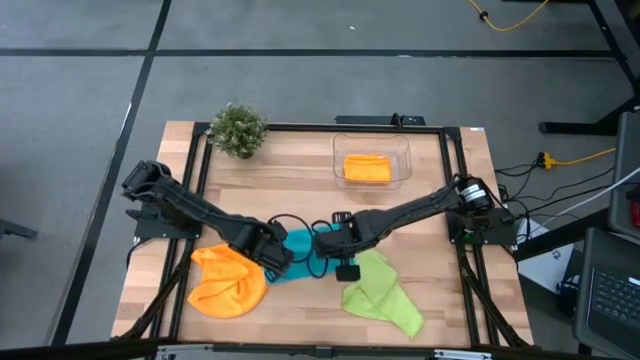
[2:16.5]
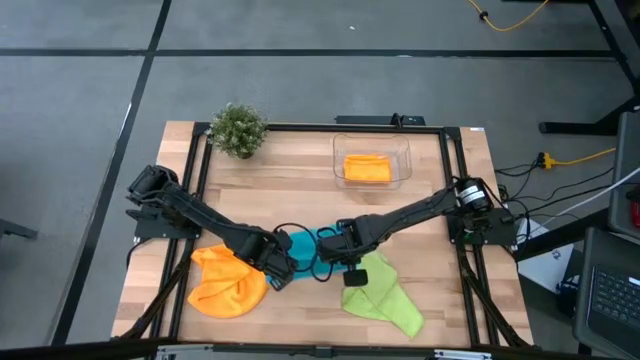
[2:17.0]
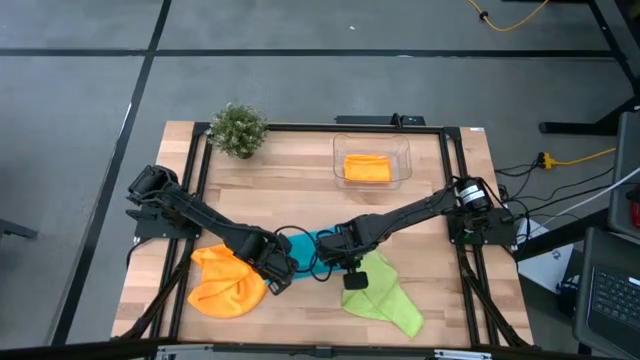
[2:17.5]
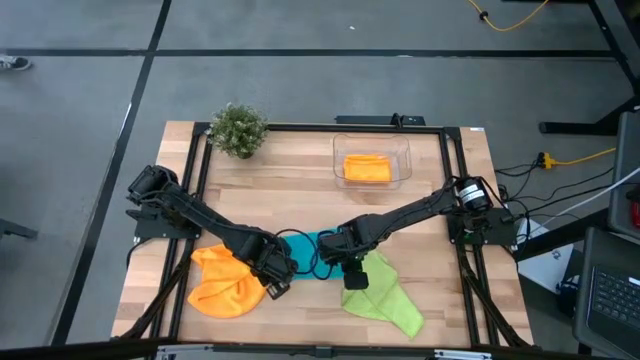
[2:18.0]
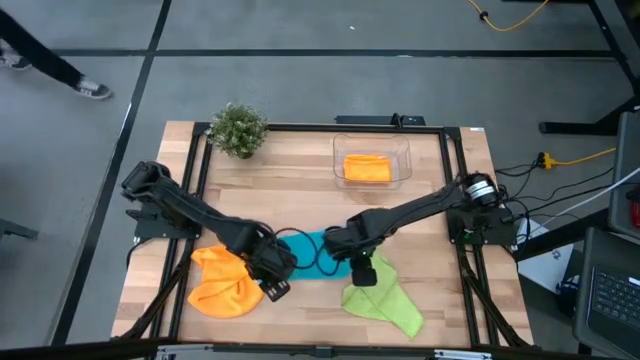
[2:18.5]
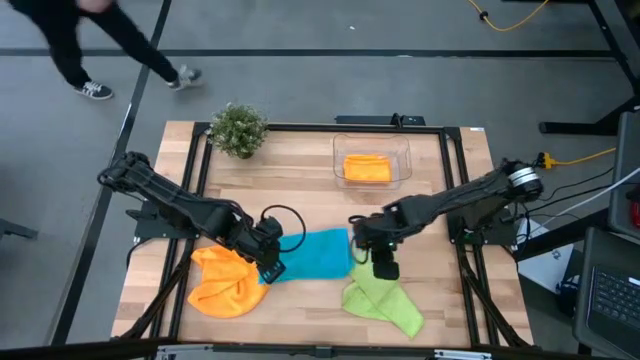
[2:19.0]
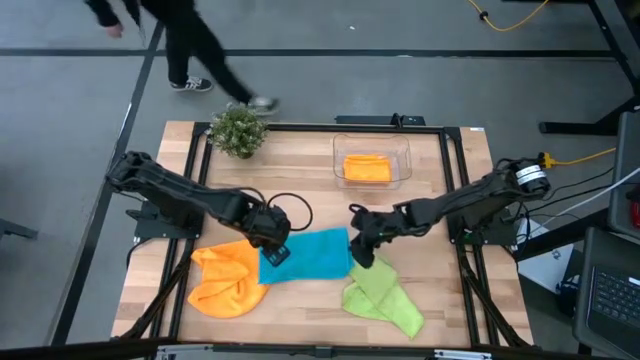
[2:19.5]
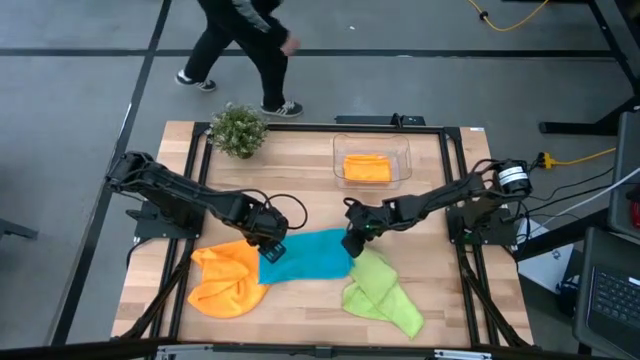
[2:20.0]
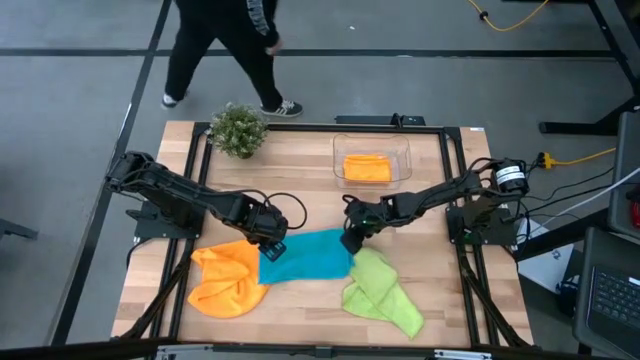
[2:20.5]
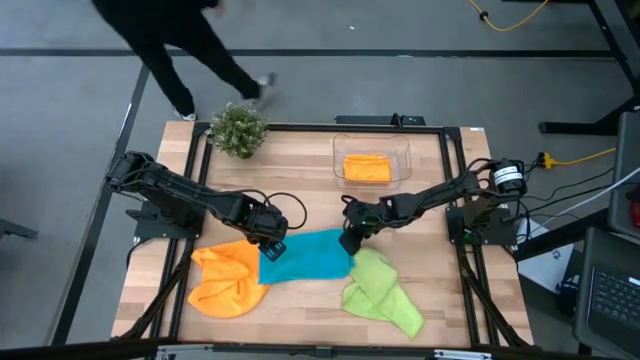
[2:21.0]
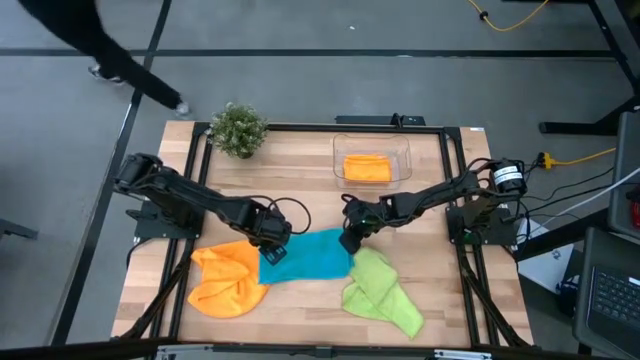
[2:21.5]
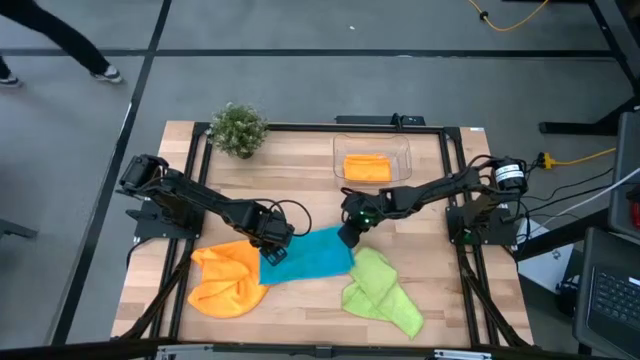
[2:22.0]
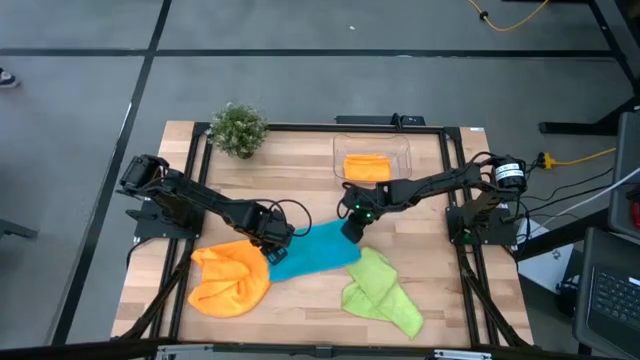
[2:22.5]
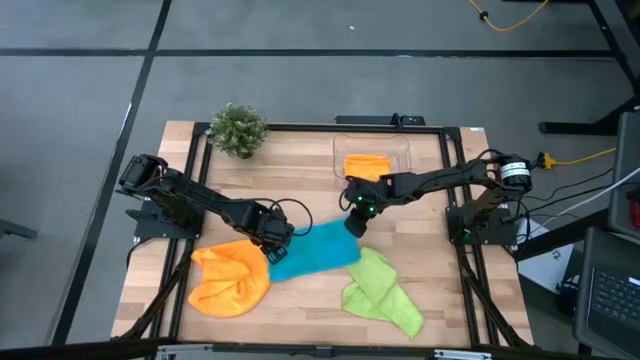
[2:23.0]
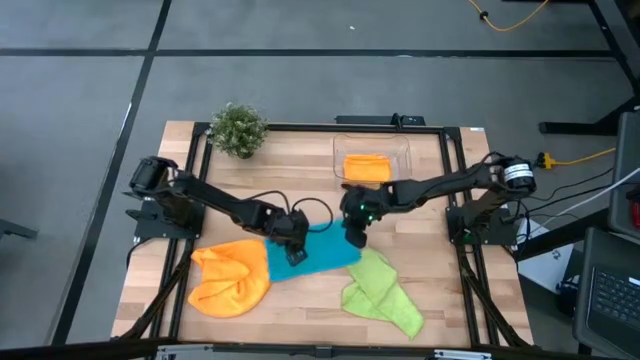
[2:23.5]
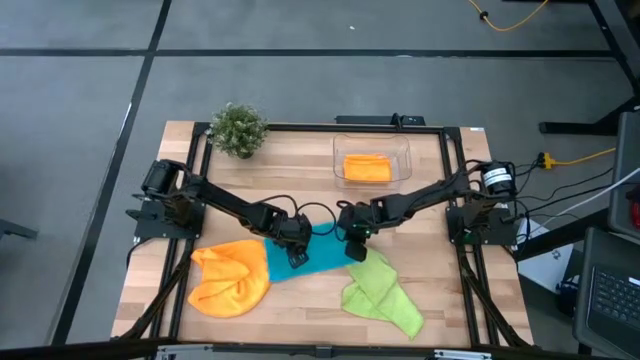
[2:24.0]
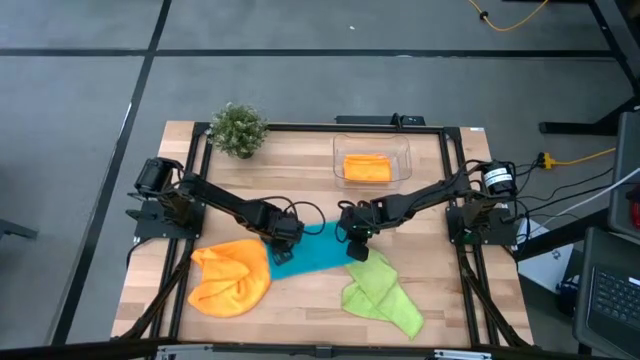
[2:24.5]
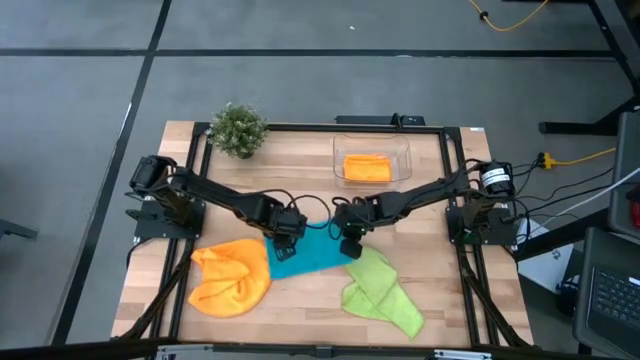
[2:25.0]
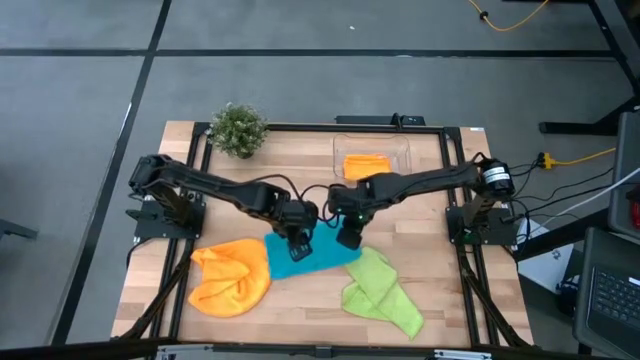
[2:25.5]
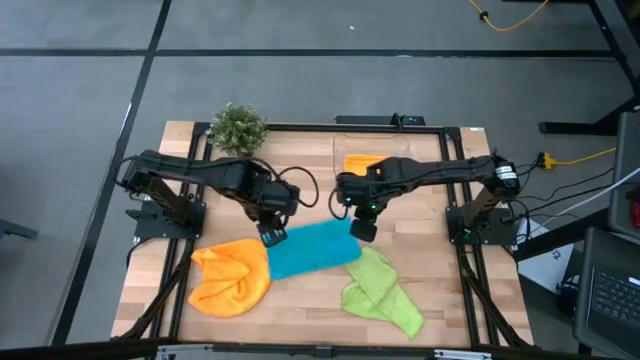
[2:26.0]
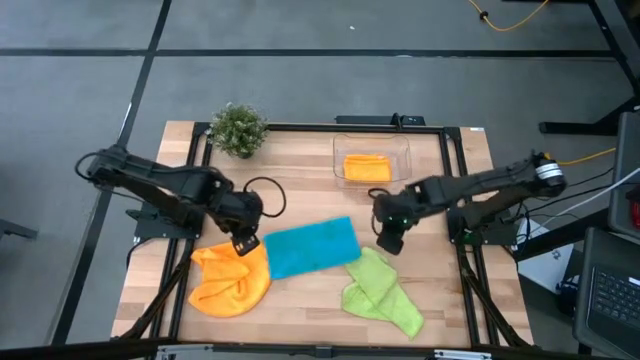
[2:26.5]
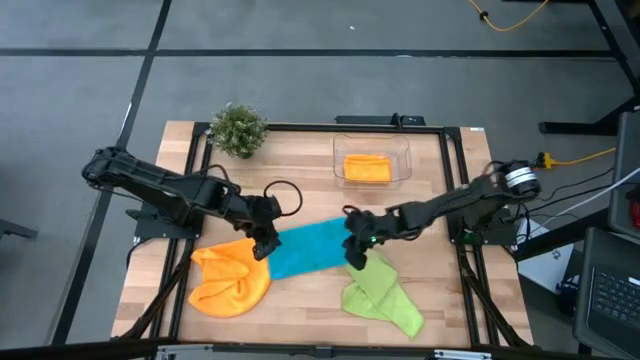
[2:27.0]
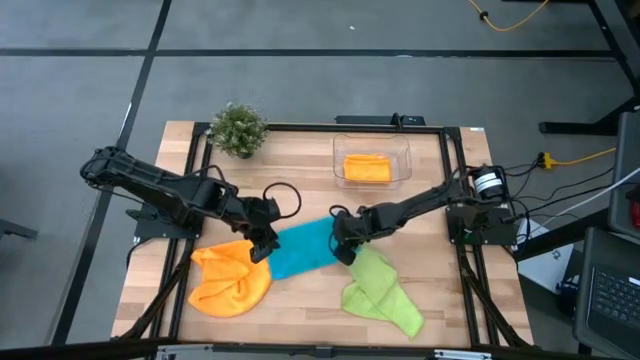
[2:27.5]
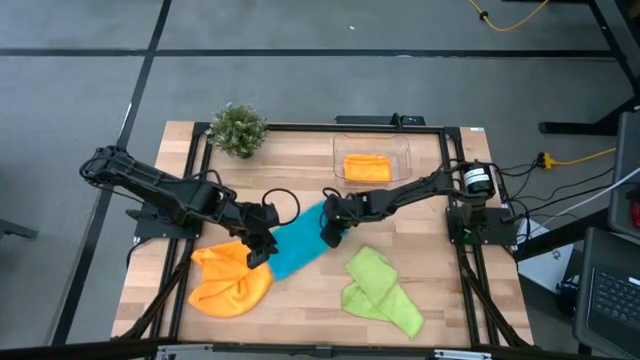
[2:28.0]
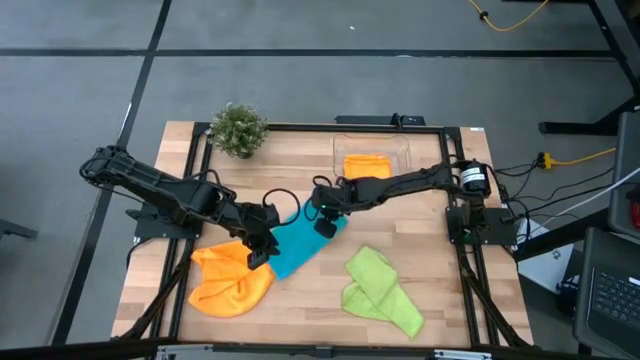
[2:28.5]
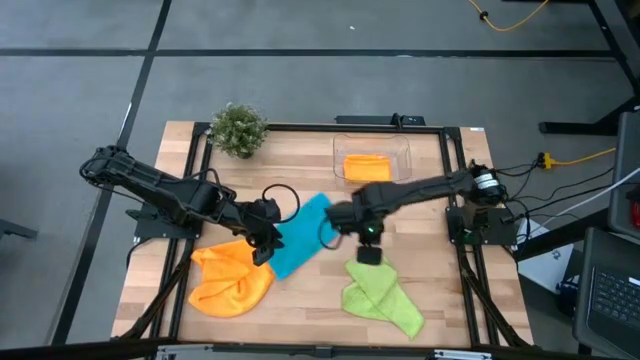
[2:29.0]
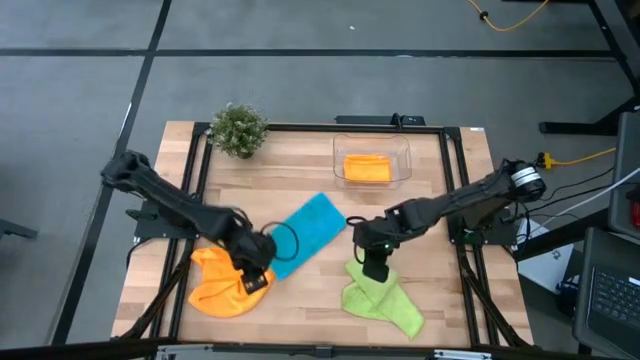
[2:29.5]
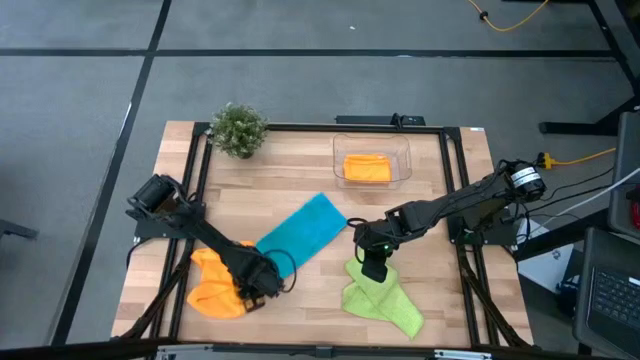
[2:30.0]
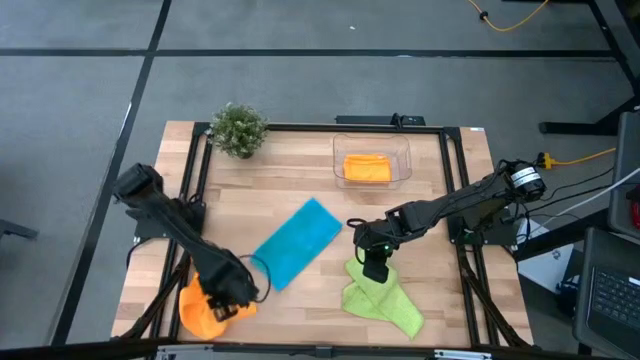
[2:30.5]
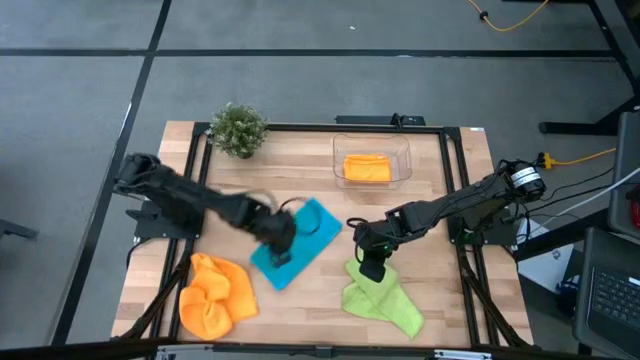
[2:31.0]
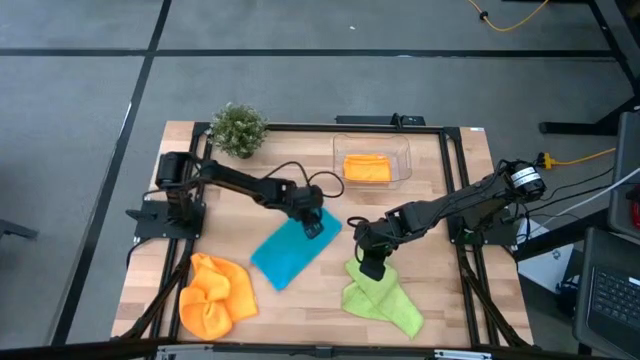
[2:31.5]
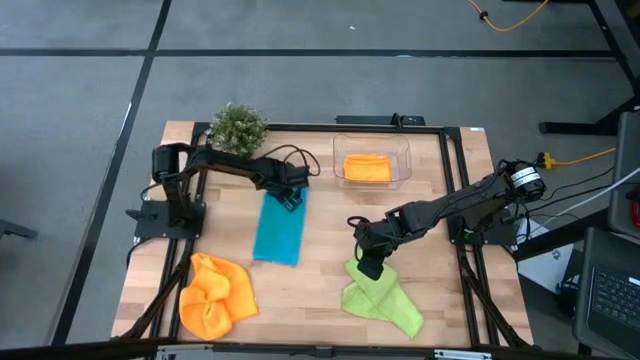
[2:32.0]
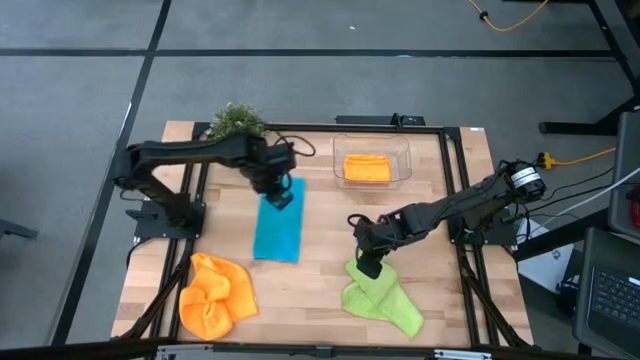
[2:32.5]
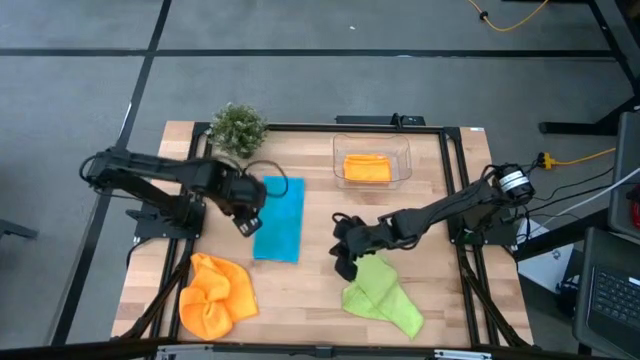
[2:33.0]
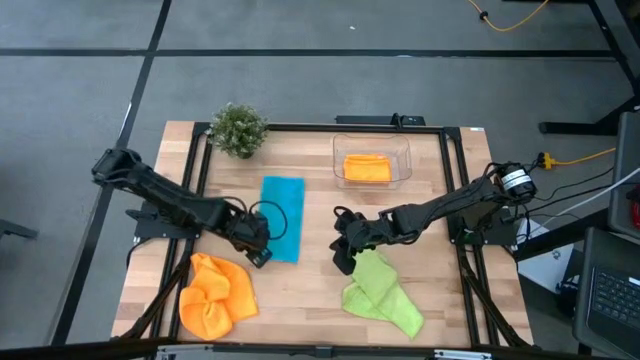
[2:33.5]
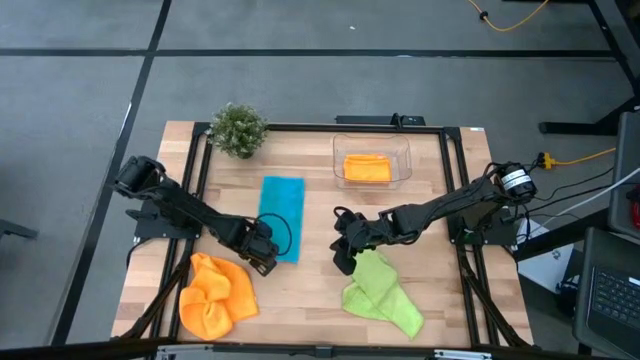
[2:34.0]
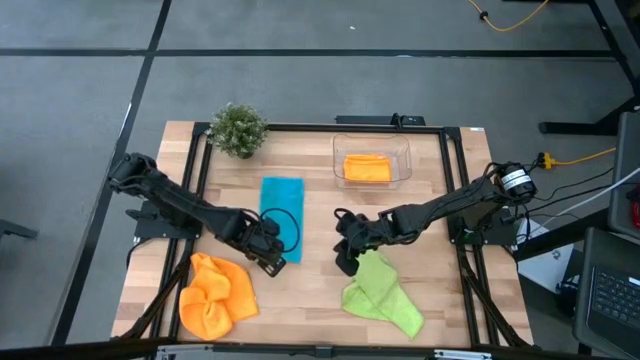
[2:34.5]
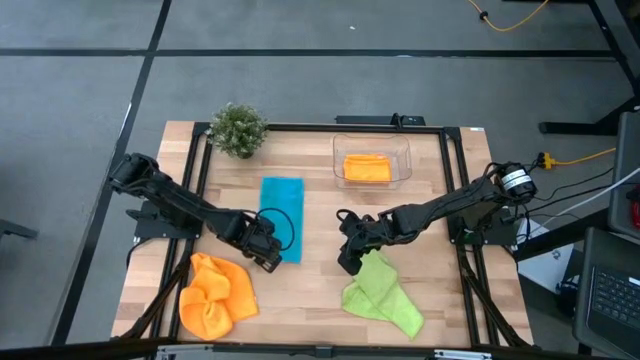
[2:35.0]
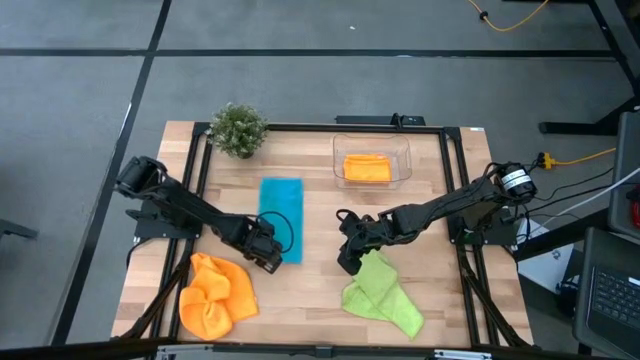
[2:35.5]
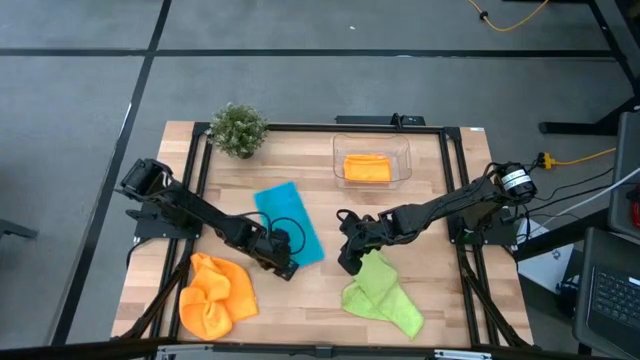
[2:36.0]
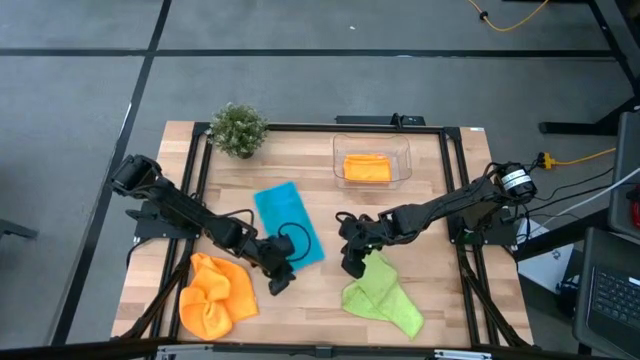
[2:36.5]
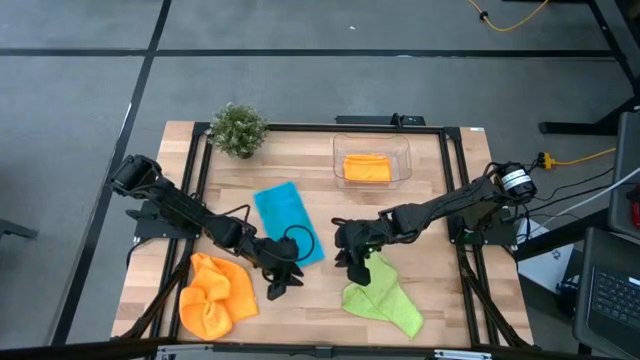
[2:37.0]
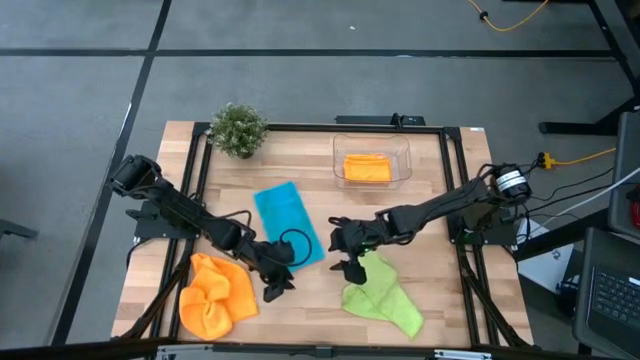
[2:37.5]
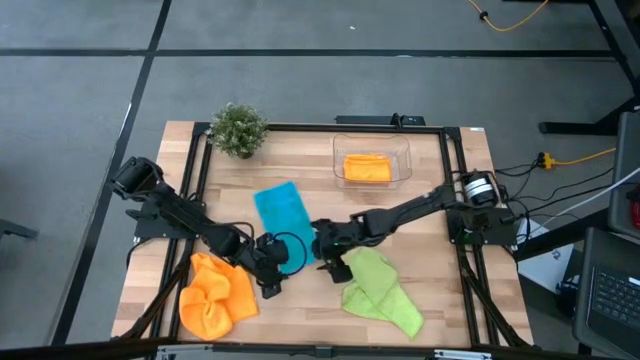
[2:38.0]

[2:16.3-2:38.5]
Task: Fold microfiber towels
Fold the blue microfiber cloth
